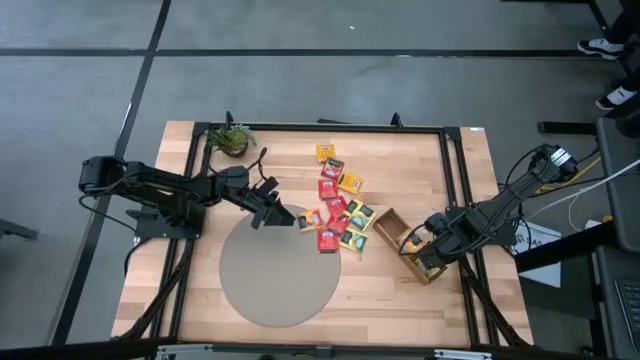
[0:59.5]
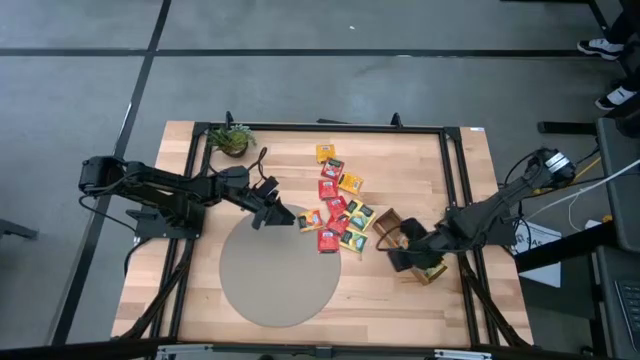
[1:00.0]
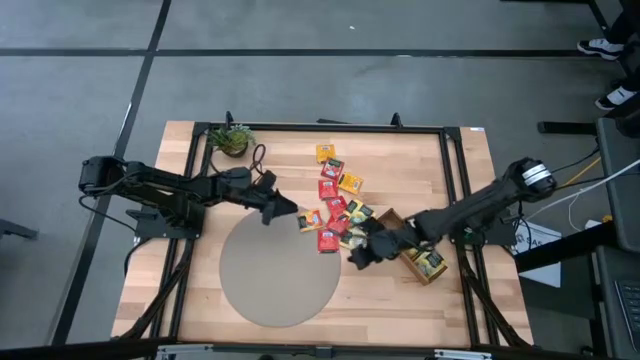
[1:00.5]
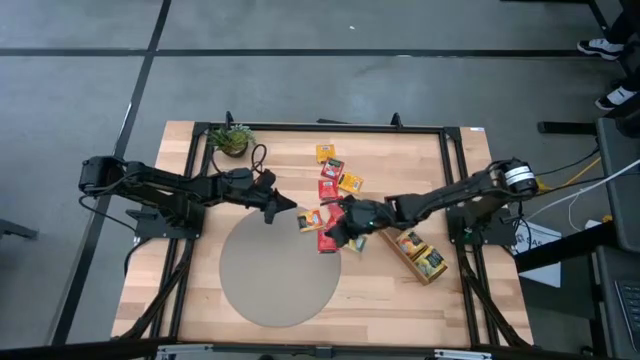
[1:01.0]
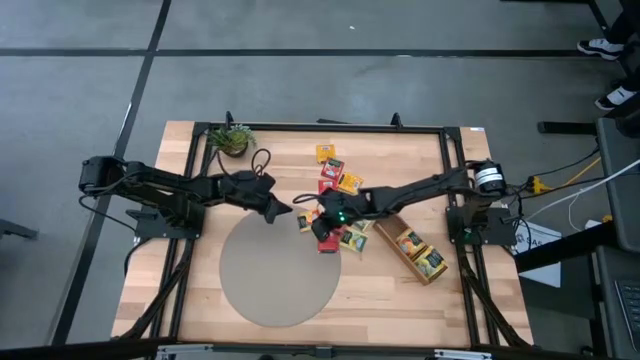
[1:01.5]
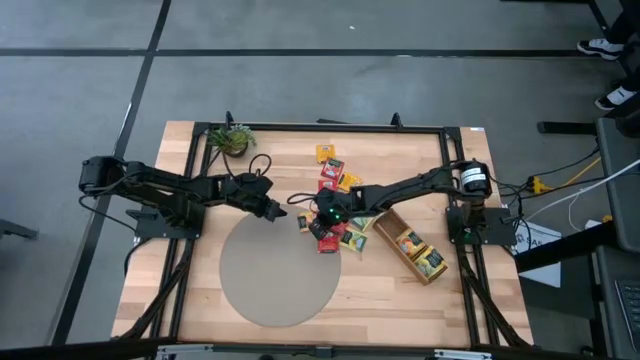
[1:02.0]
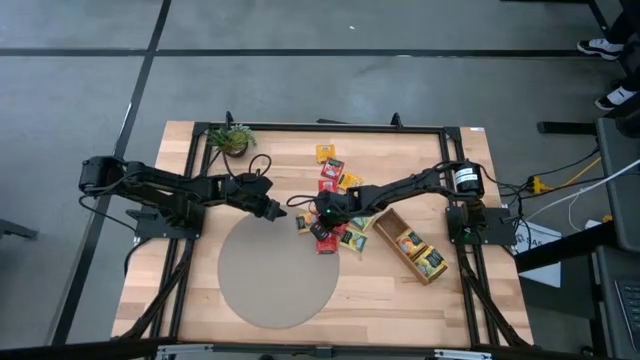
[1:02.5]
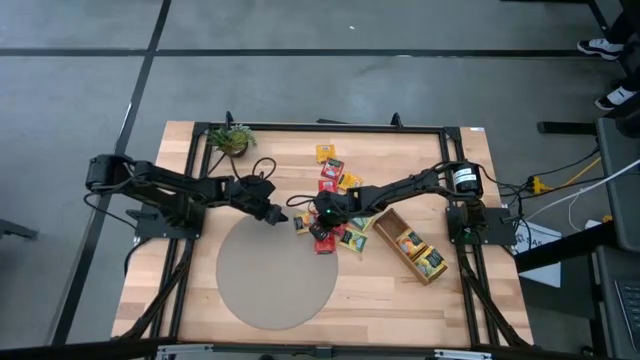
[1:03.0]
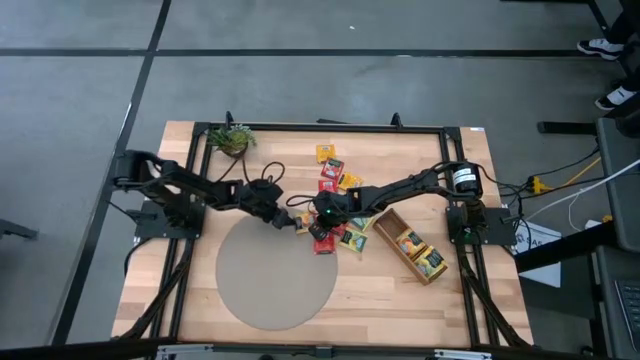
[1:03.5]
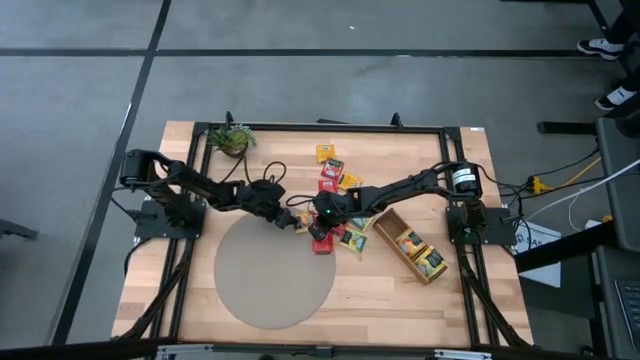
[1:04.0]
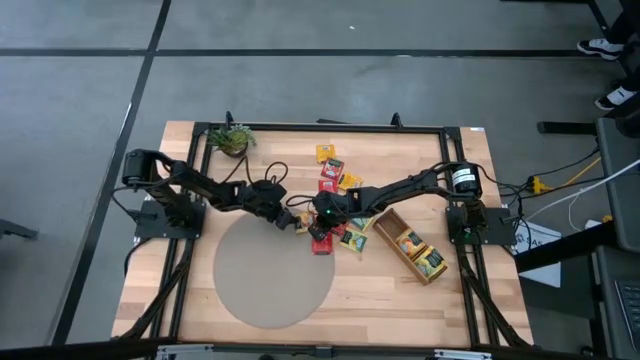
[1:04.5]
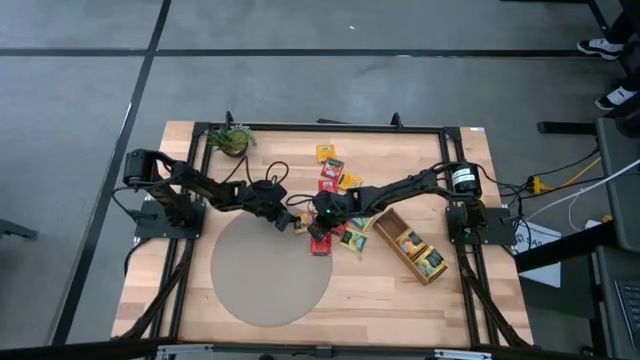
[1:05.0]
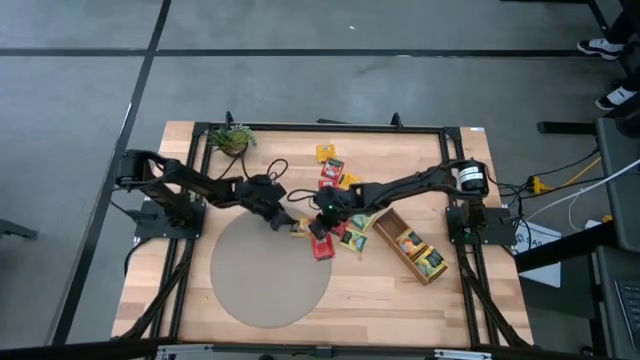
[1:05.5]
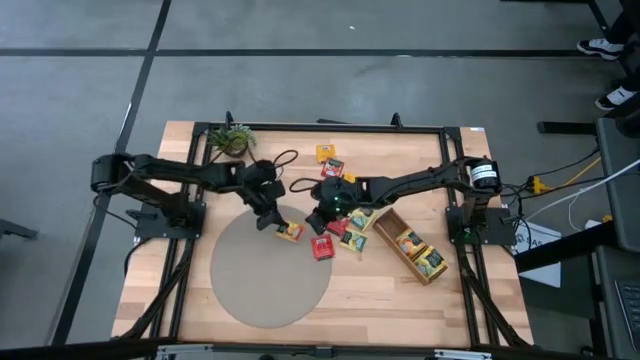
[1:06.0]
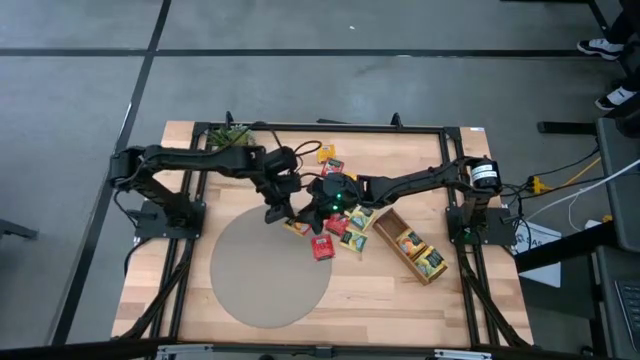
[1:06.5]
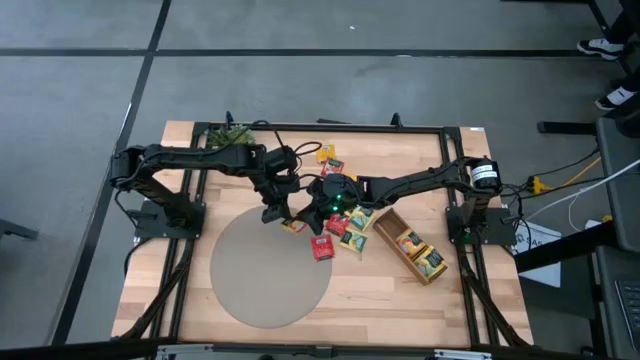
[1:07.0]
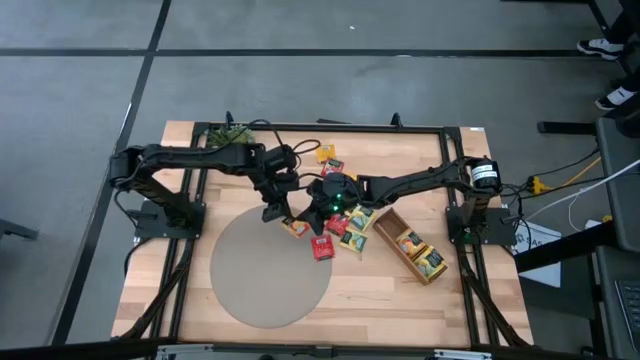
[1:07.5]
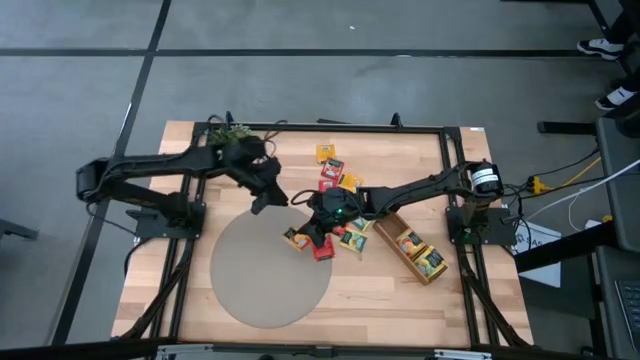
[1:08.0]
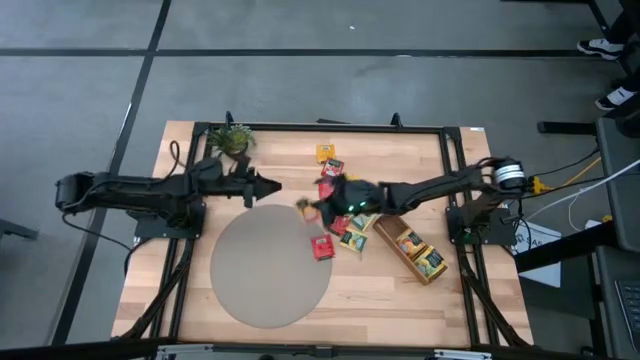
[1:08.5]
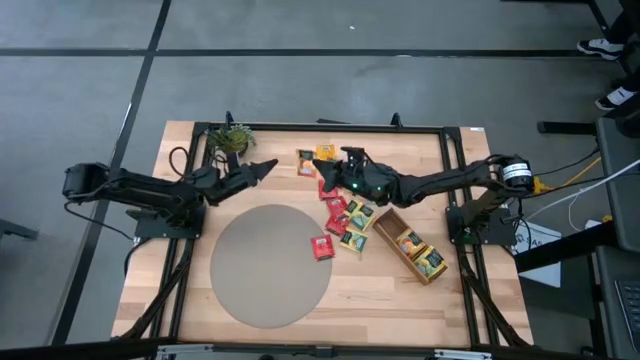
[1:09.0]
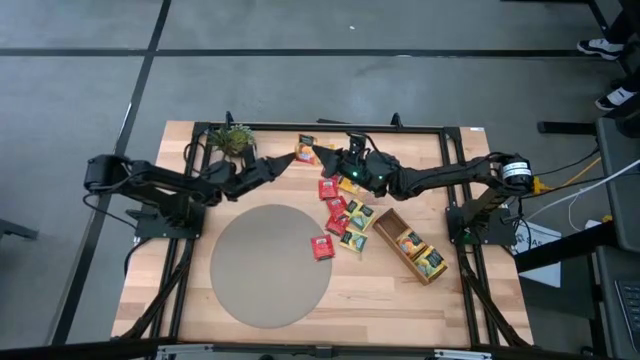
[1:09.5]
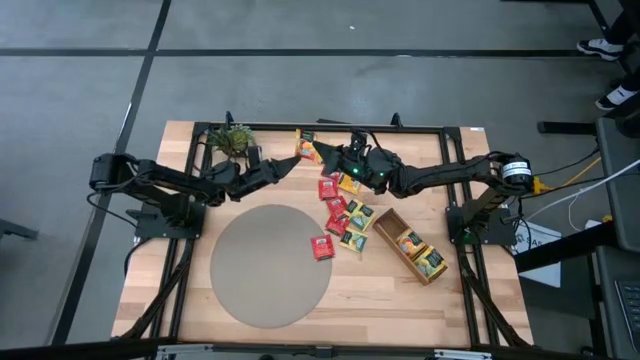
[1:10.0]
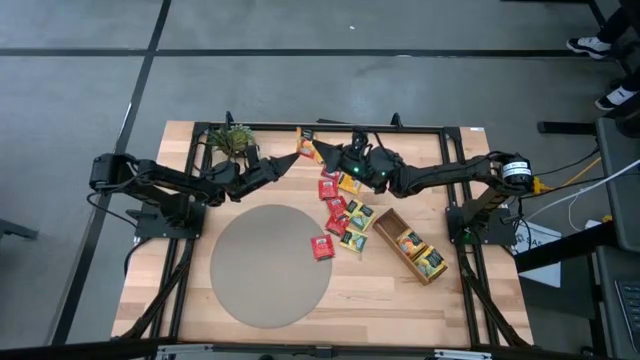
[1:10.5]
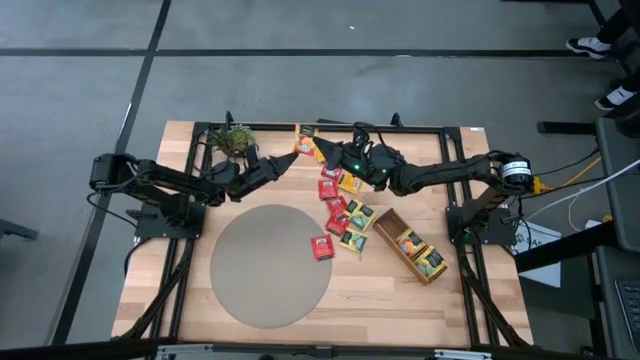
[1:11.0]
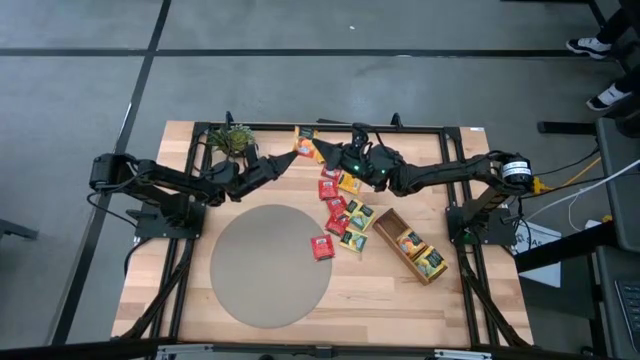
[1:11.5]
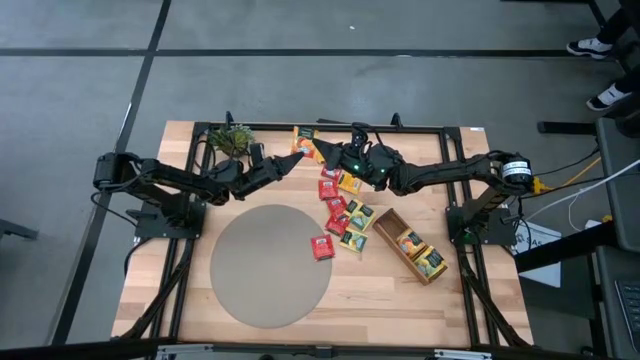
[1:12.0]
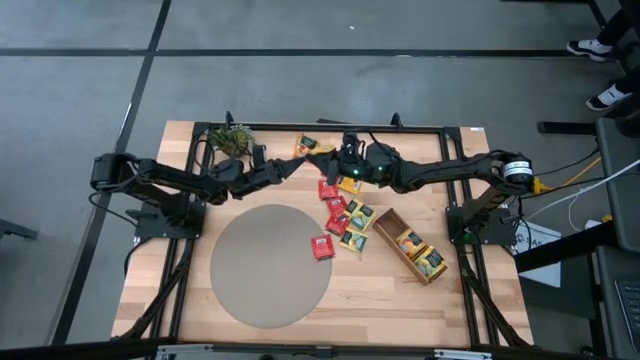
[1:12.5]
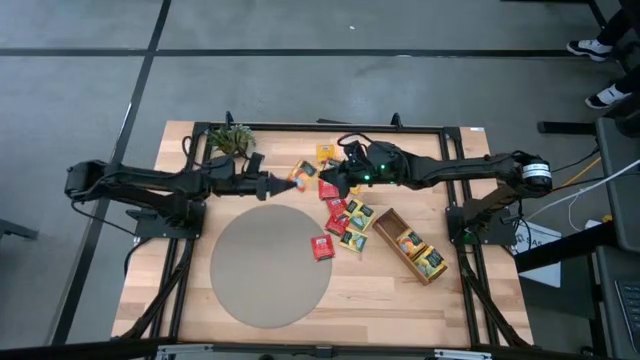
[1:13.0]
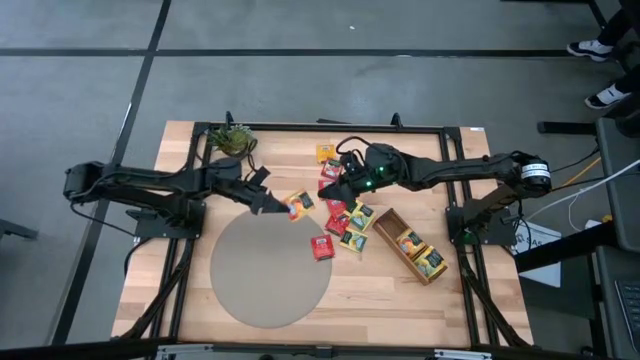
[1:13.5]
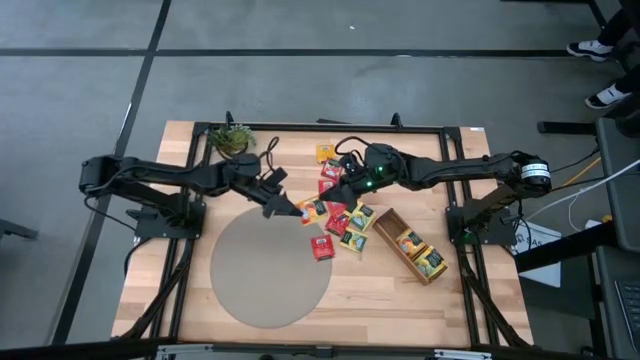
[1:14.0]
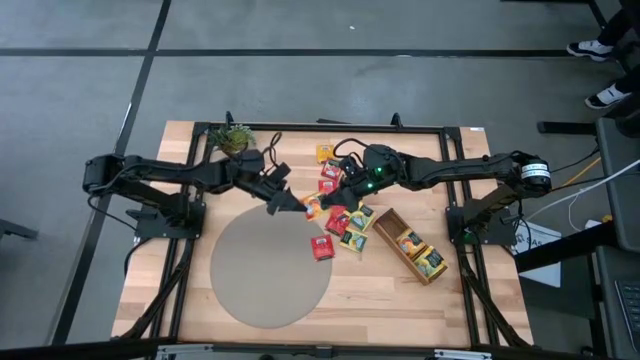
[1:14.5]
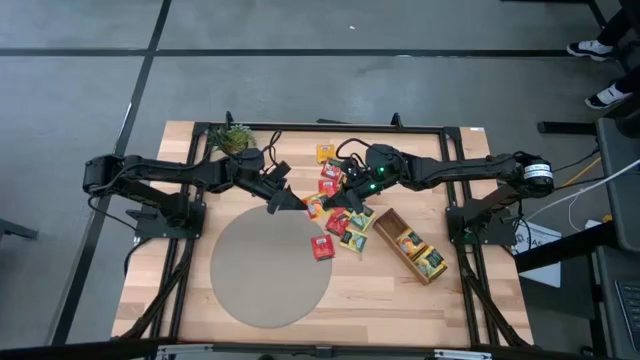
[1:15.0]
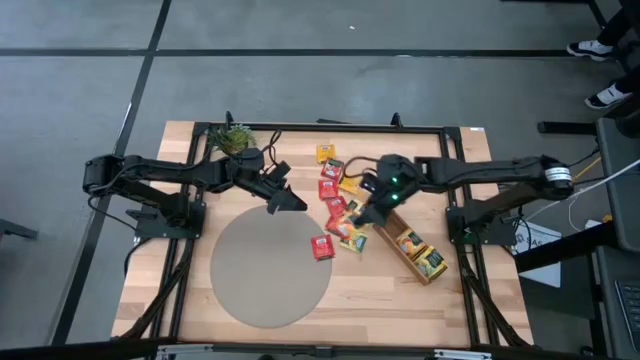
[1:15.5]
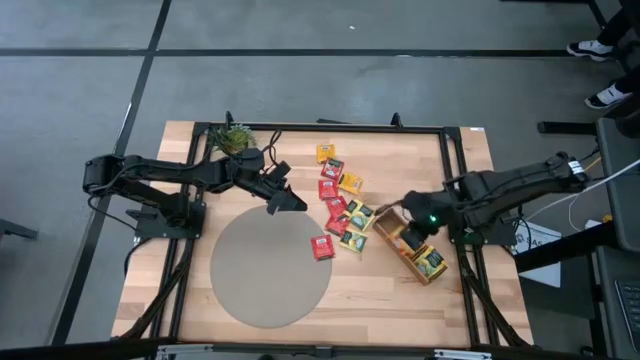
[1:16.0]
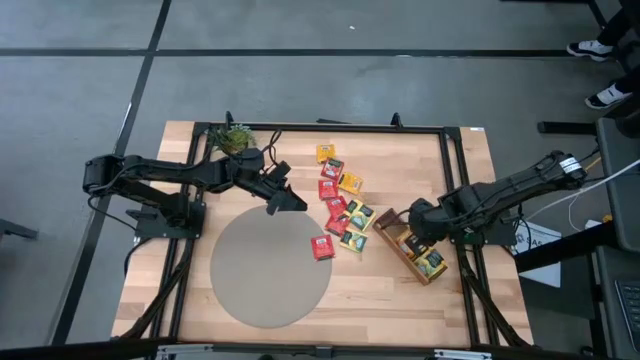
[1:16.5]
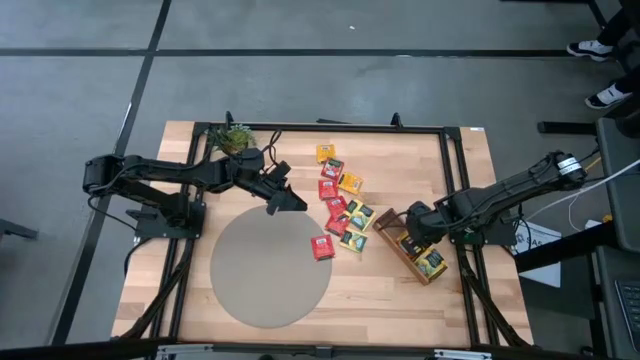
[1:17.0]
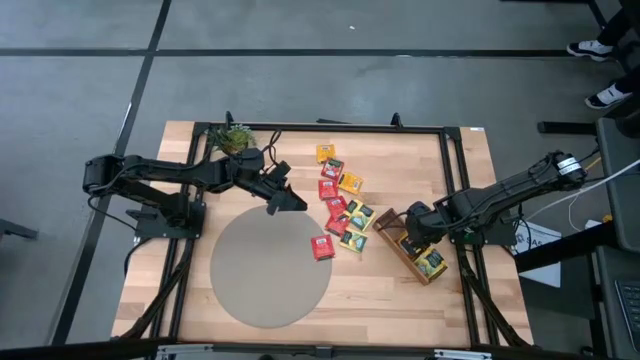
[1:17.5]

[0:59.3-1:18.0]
Task: Pick & Place Tea
Put the orange tea bag into the middle section of the wooden organizer

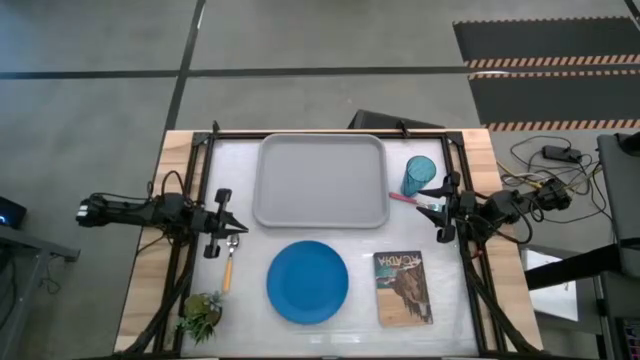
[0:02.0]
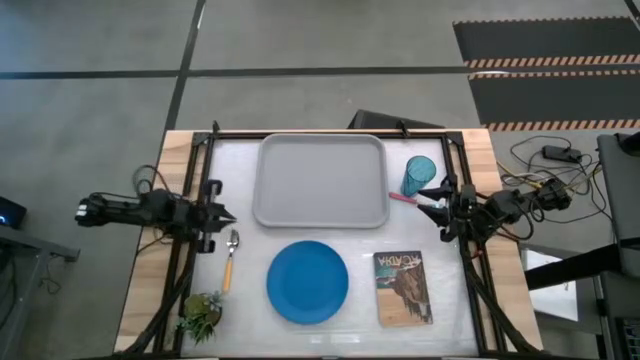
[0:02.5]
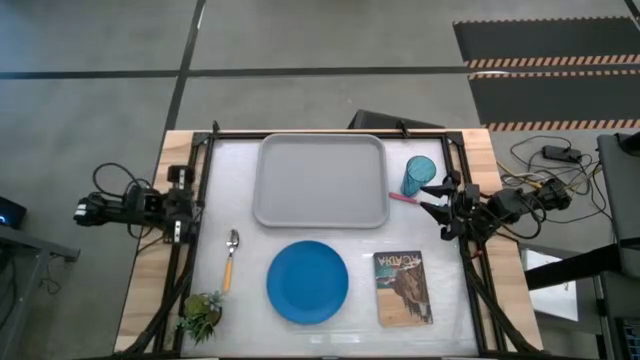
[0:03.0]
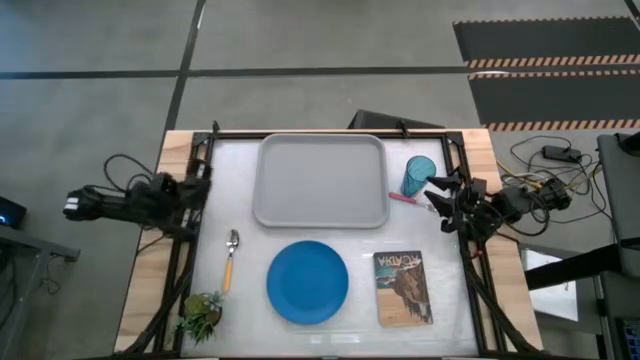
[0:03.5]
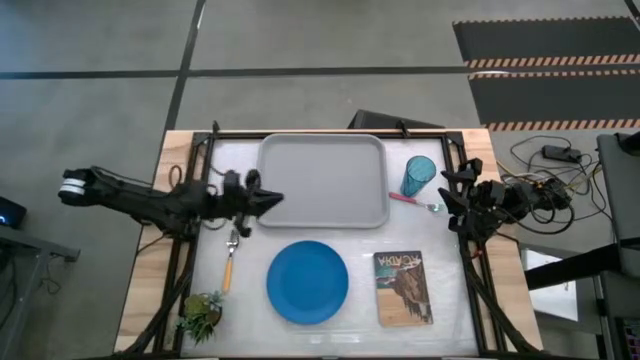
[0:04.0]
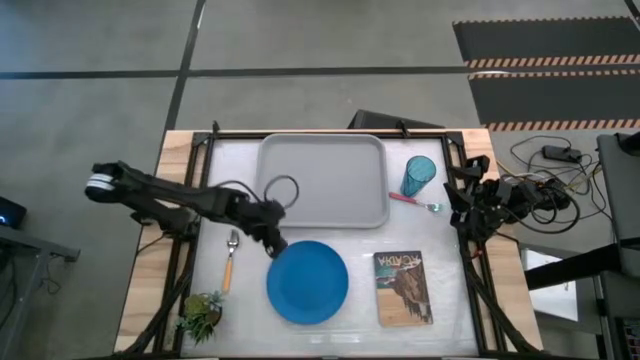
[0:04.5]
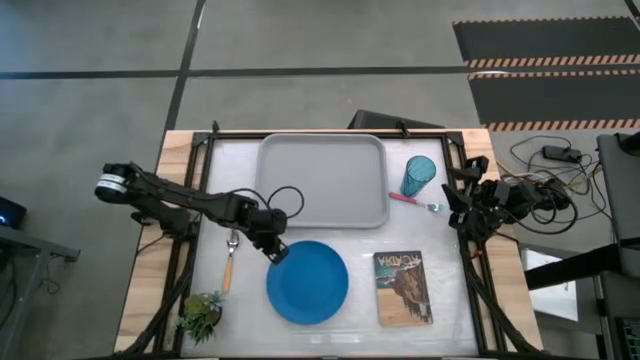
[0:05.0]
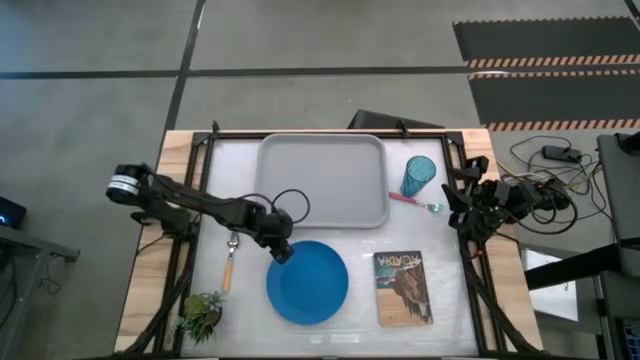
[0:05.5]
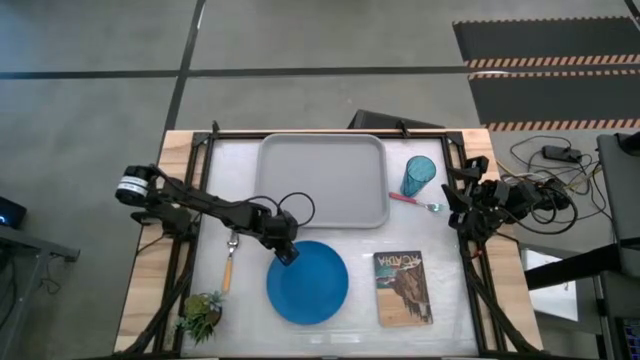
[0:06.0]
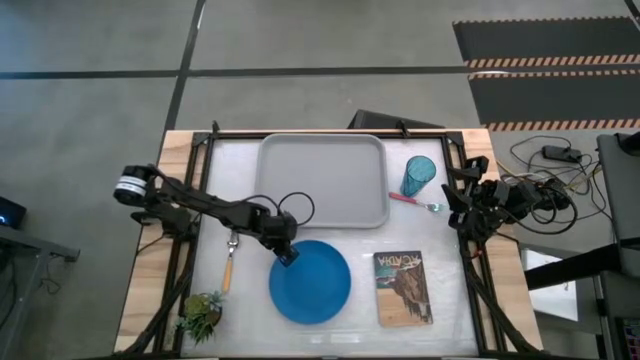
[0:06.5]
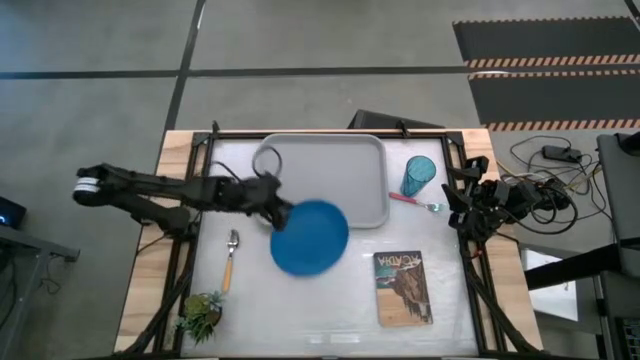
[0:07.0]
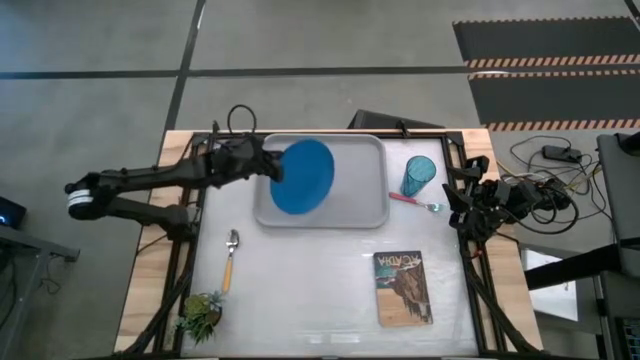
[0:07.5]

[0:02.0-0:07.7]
Task: Pick and place plate/cup/fork/spoon on tray
Put the blue plate on the top left of the gray tray
